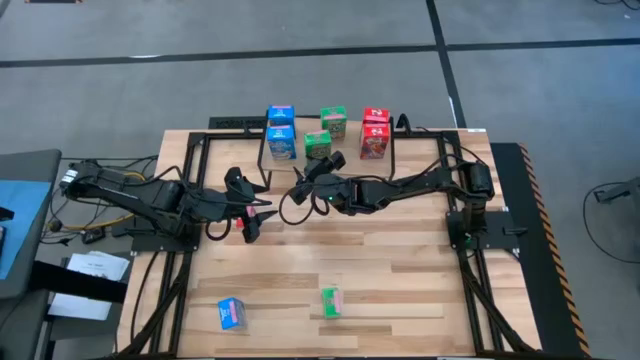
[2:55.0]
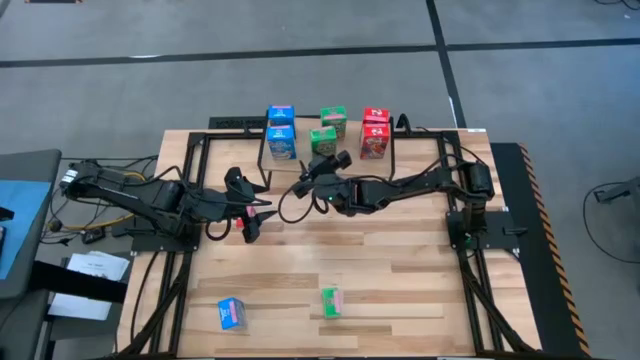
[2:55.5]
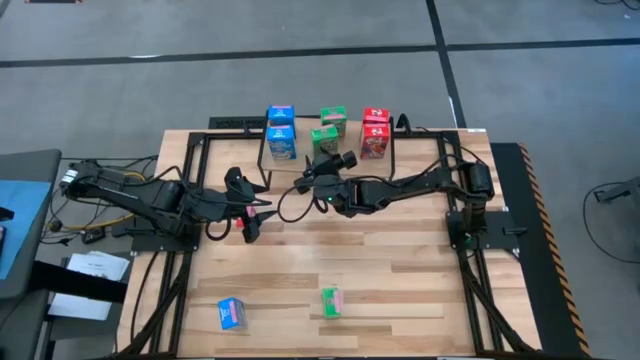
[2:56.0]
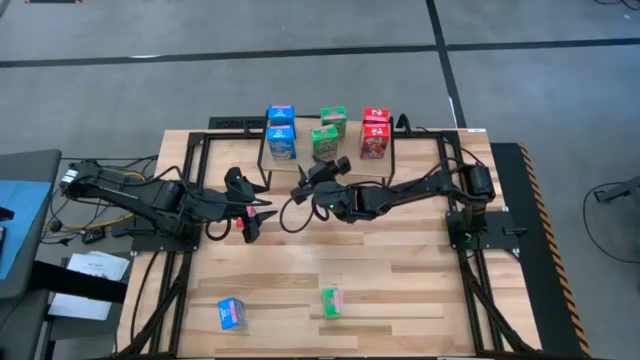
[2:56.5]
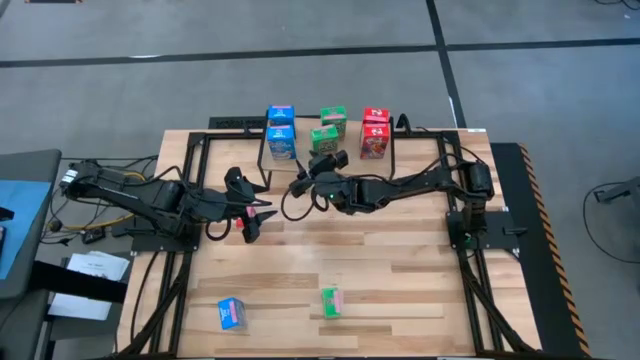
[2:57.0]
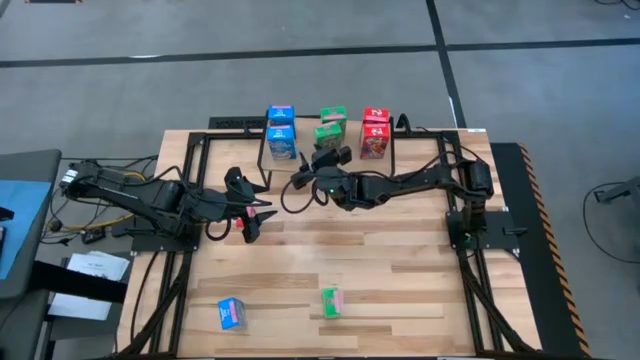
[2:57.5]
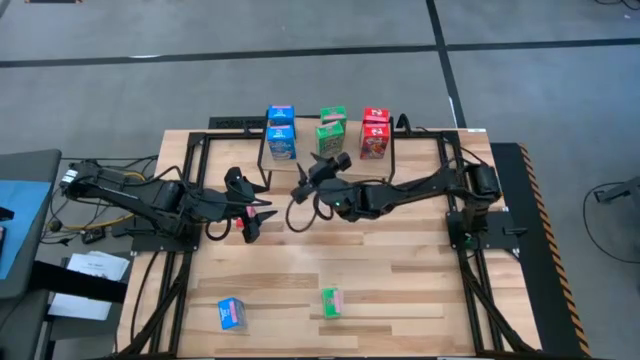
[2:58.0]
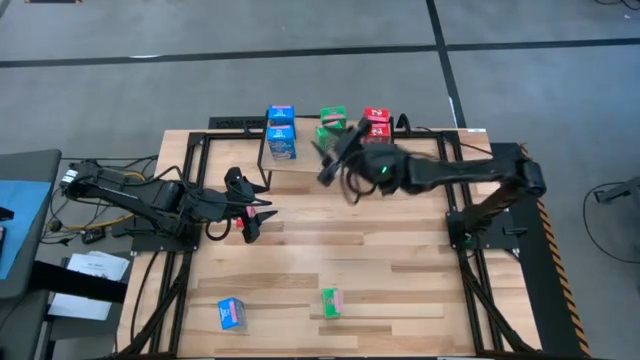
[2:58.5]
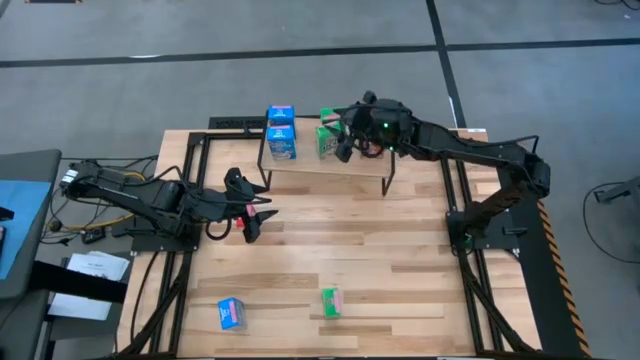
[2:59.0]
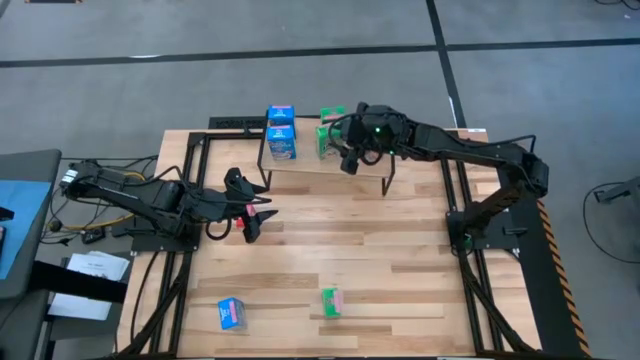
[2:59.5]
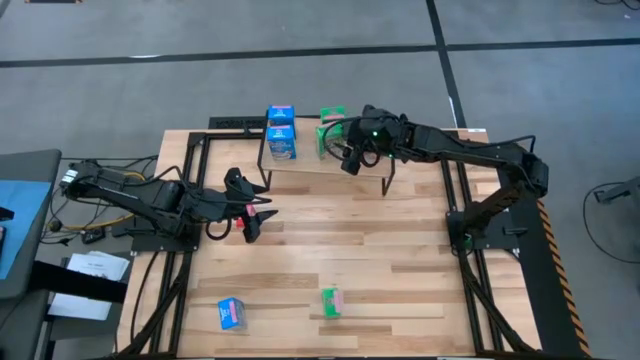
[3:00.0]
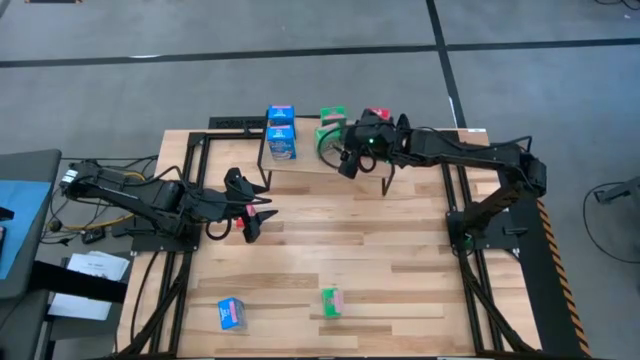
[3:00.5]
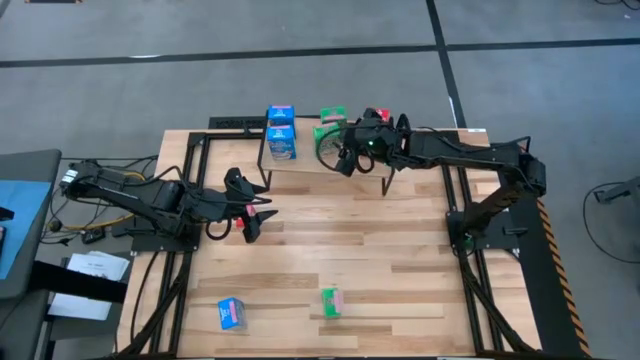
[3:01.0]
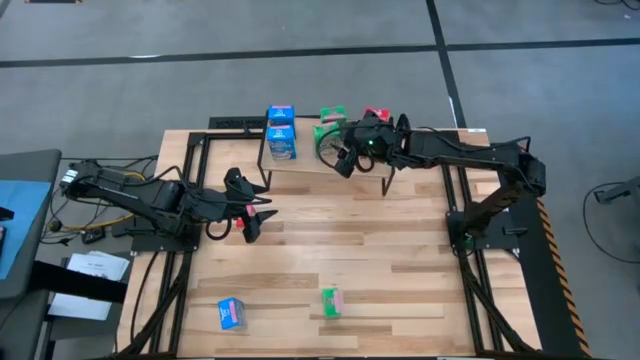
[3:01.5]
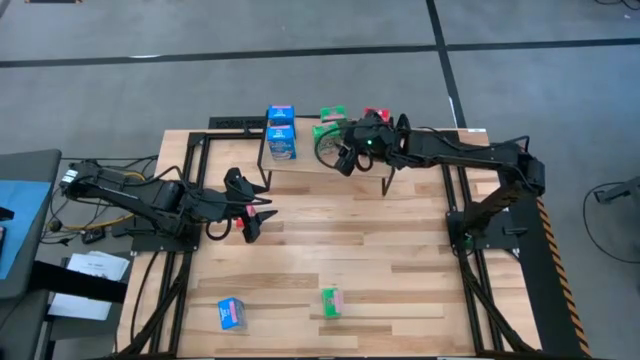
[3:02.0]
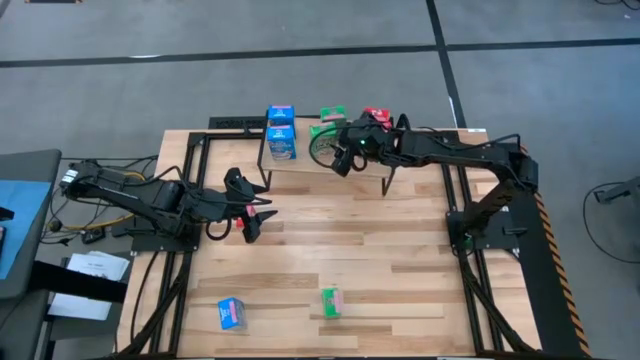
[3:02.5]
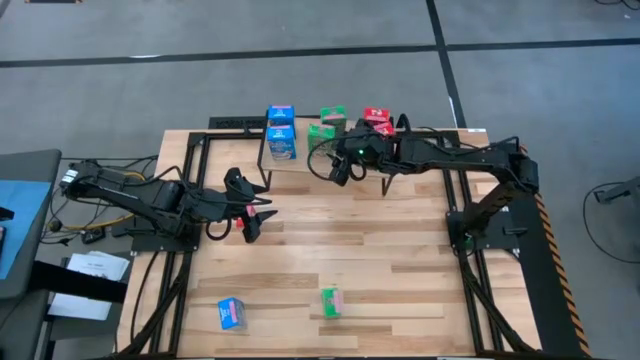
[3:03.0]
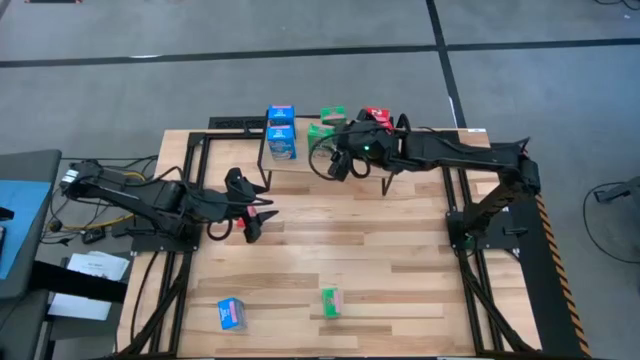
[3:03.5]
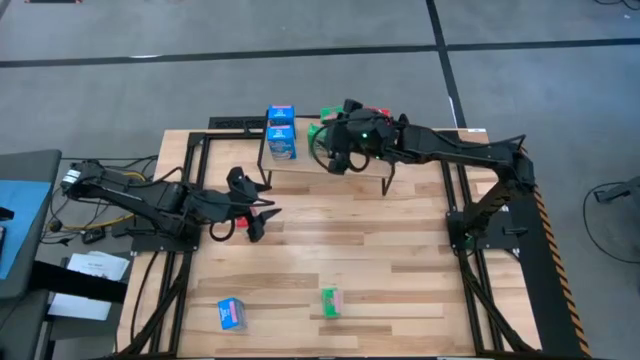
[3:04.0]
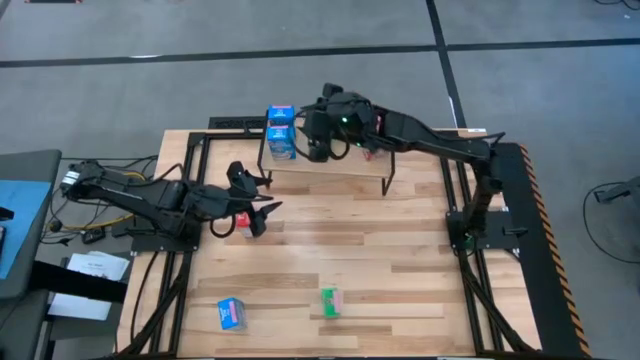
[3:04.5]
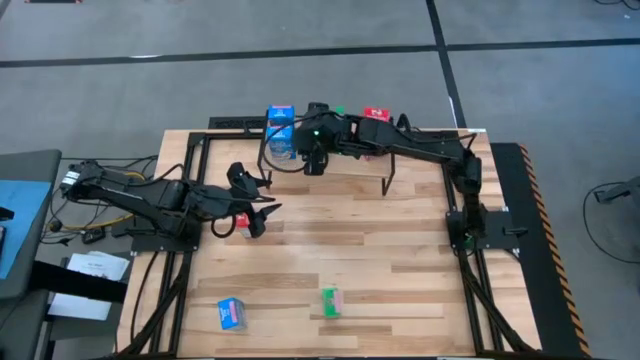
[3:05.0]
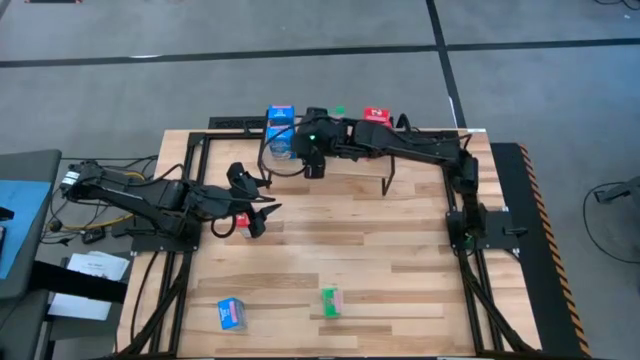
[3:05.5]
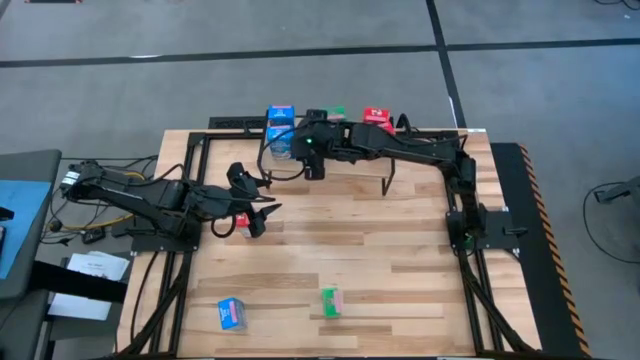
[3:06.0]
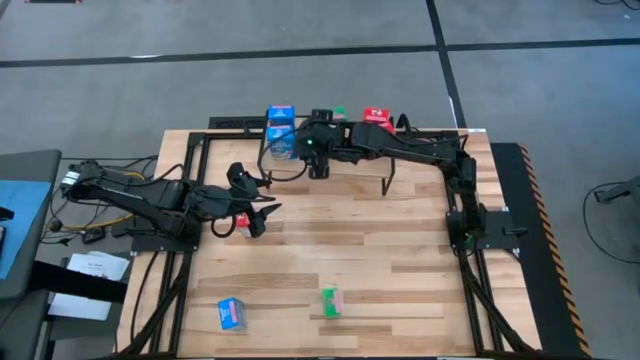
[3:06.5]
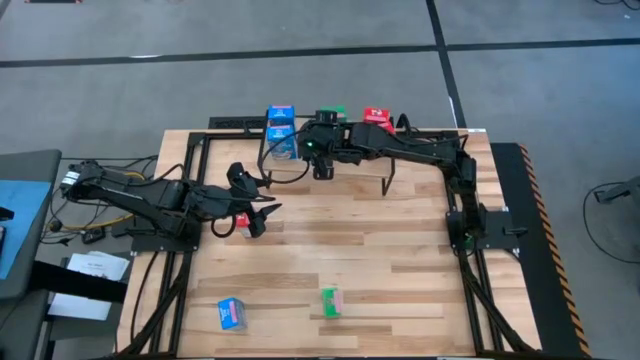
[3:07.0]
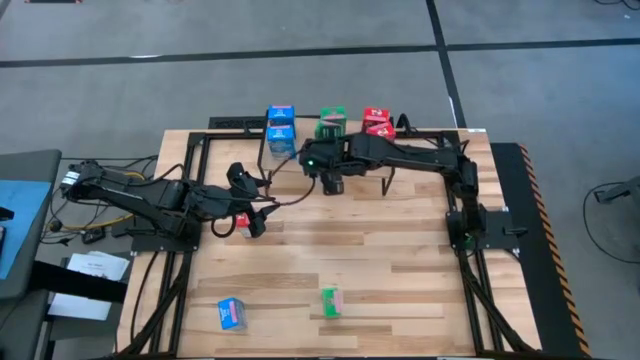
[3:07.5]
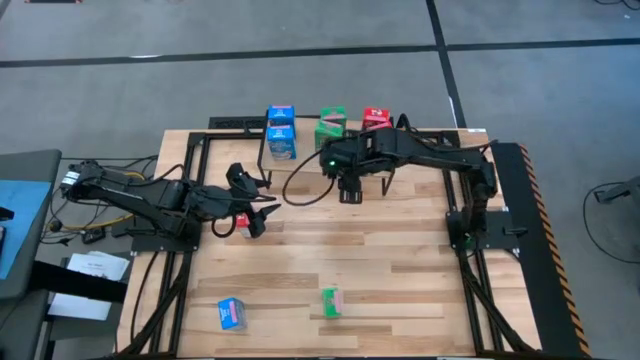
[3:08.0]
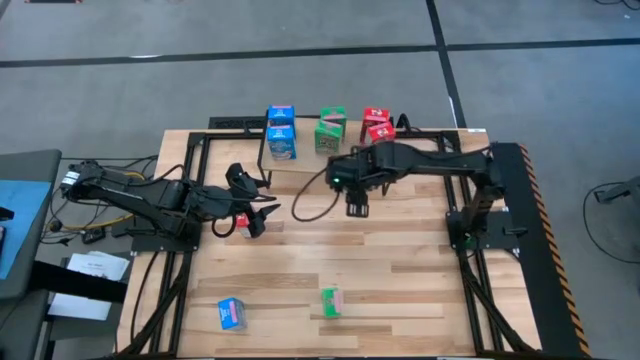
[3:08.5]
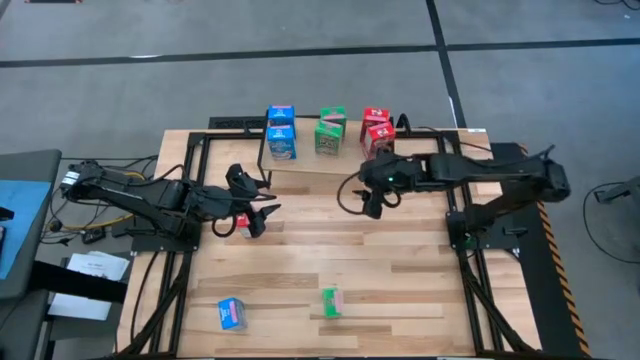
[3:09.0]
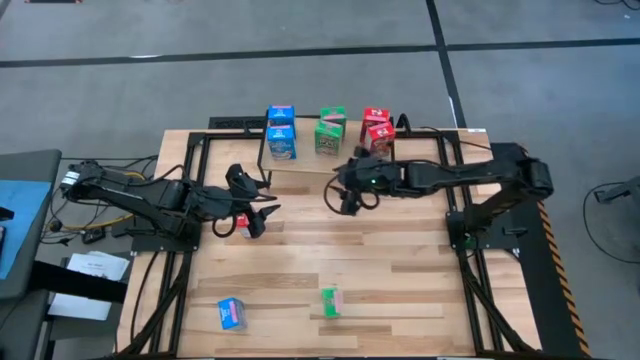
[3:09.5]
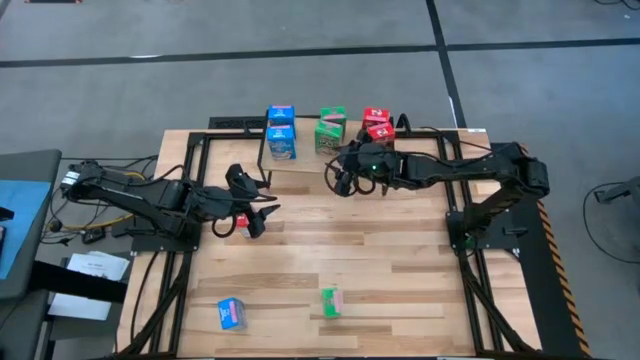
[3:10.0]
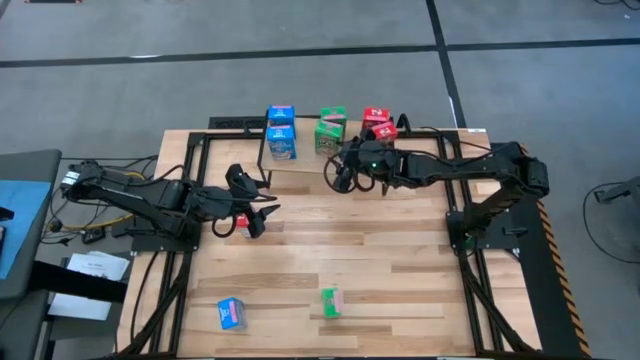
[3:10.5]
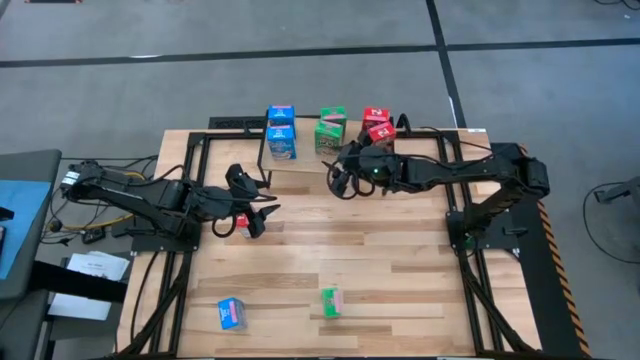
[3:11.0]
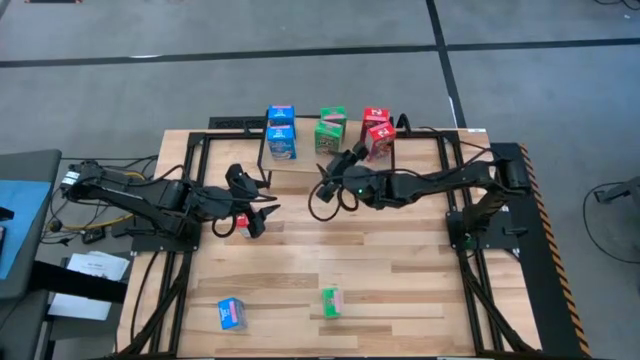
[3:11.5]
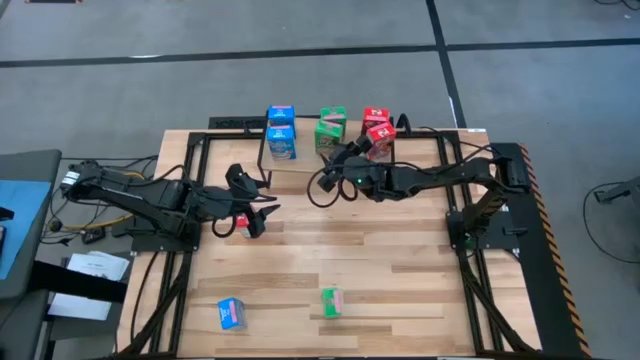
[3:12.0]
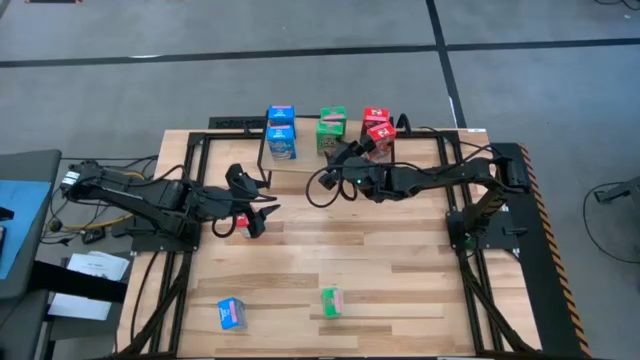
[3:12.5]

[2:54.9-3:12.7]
Task: Stack cereal on shelf
Put the top green cereal box on the shelf aligned with the other green cereal box

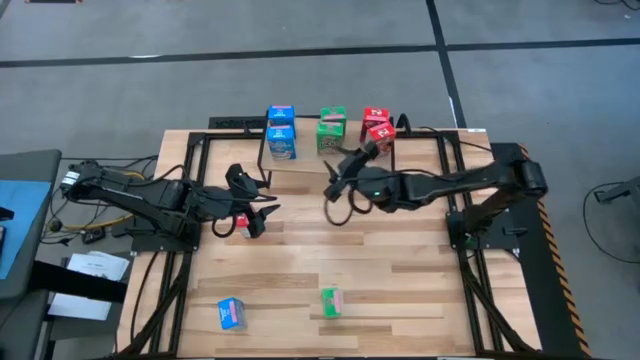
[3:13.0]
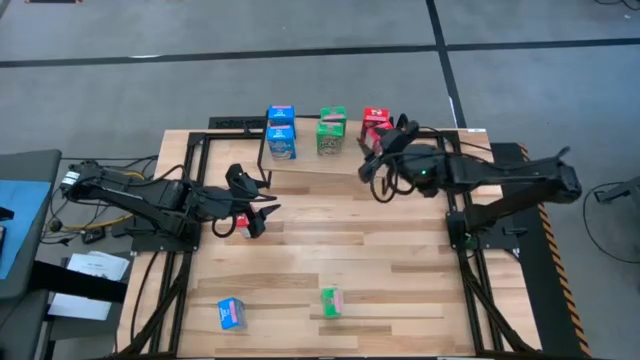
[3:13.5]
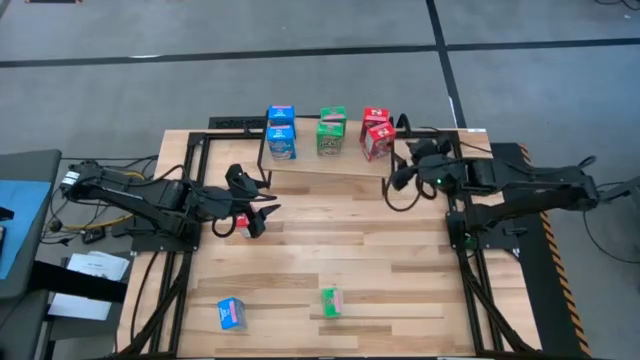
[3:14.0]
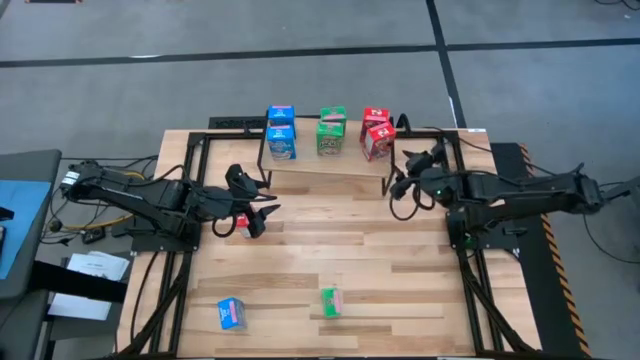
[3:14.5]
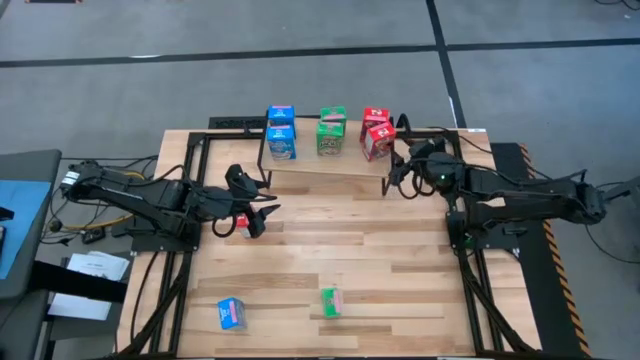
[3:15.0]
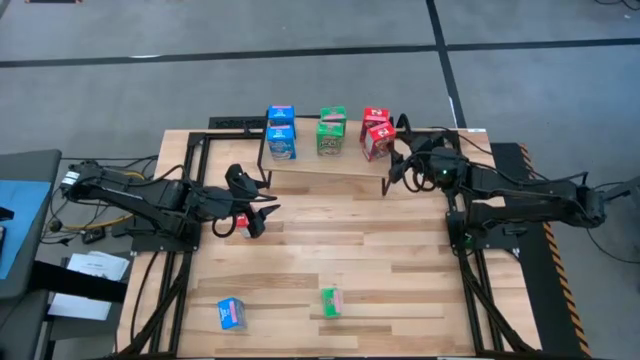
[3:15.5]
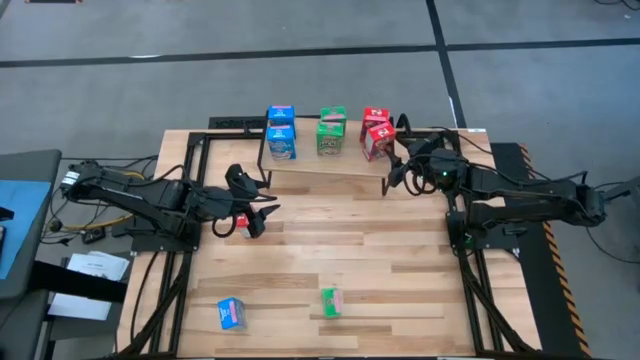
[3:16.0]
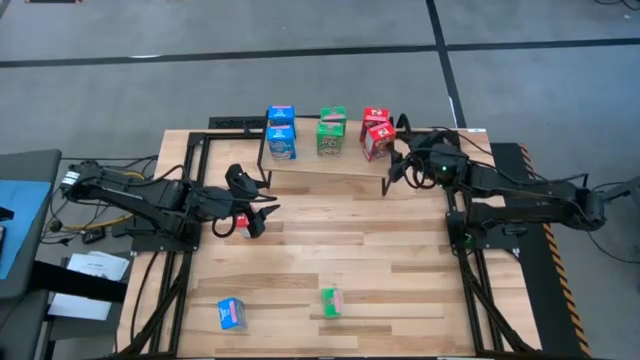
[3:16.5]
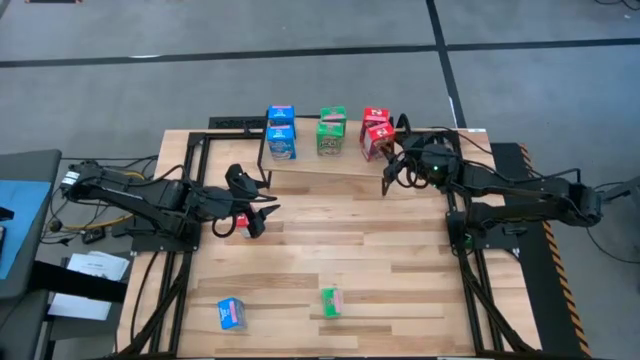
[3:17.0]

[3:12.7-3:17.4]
Adjust the red cereal box on the shelf
